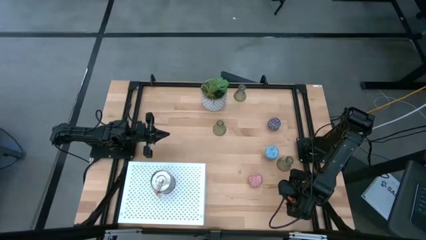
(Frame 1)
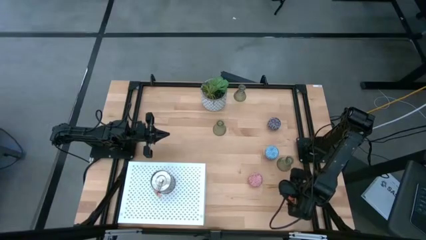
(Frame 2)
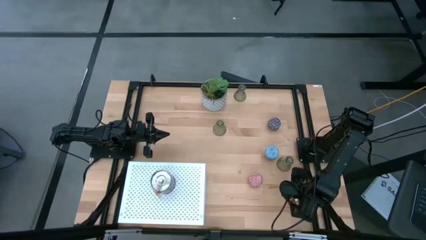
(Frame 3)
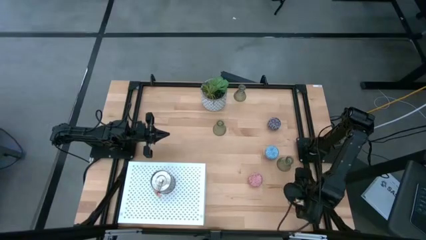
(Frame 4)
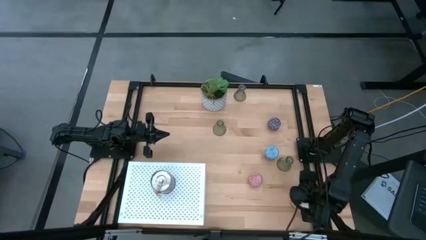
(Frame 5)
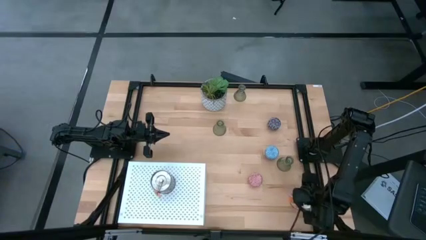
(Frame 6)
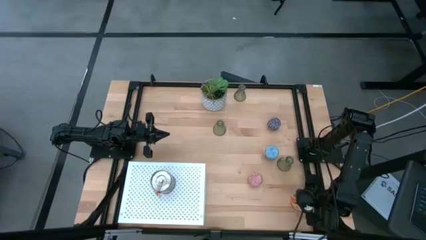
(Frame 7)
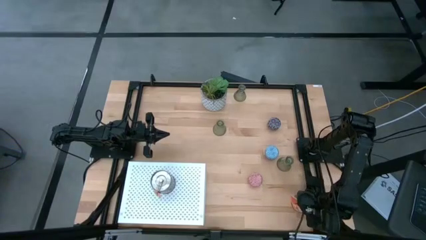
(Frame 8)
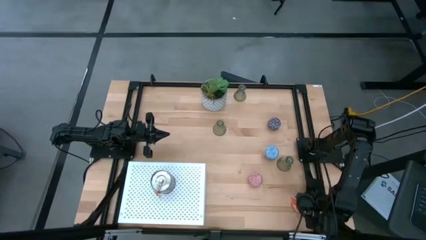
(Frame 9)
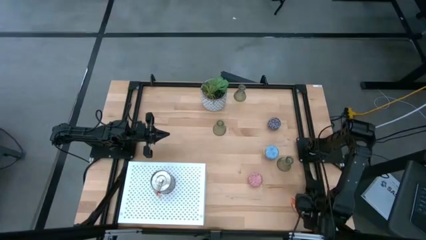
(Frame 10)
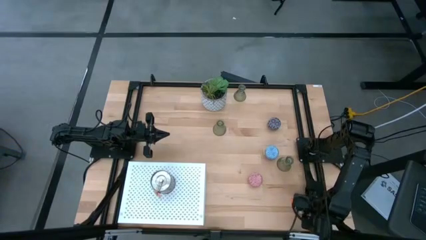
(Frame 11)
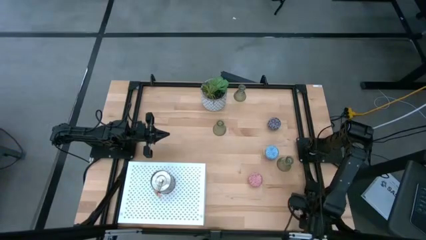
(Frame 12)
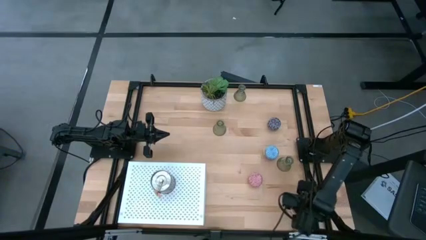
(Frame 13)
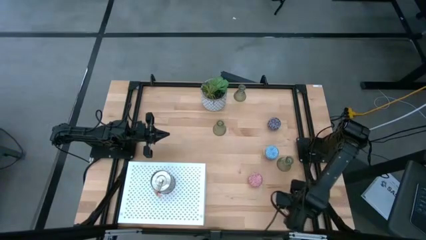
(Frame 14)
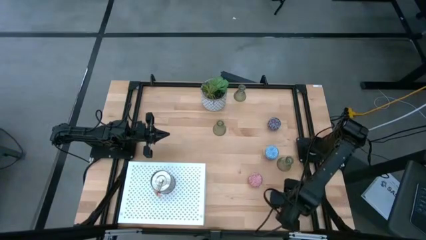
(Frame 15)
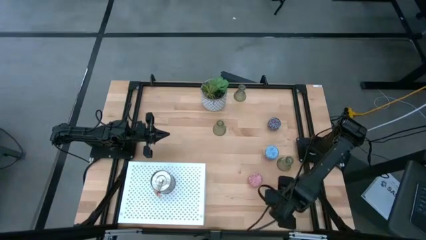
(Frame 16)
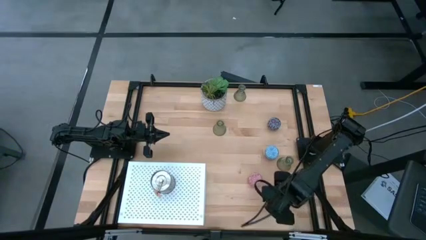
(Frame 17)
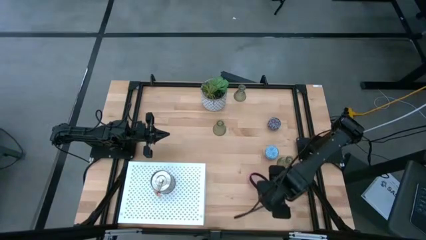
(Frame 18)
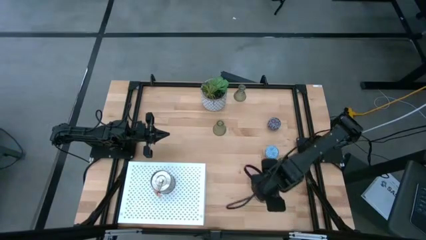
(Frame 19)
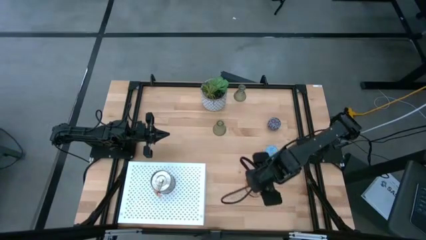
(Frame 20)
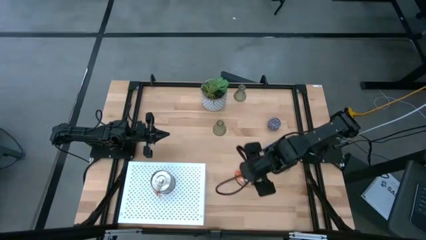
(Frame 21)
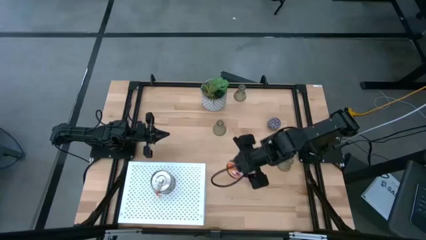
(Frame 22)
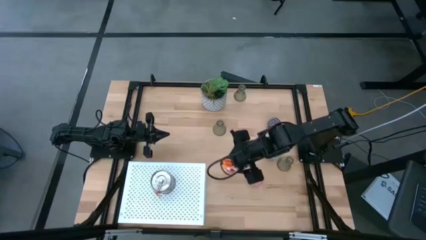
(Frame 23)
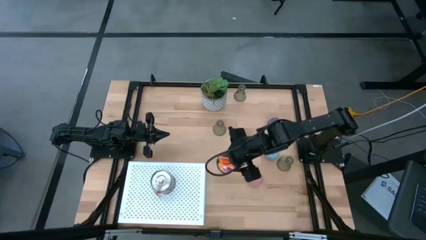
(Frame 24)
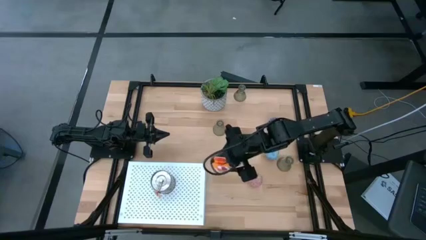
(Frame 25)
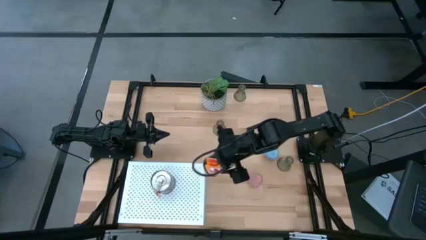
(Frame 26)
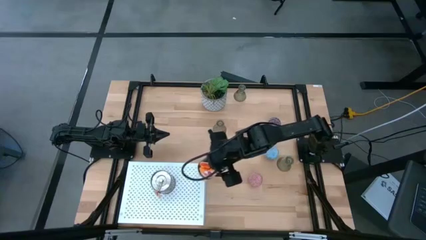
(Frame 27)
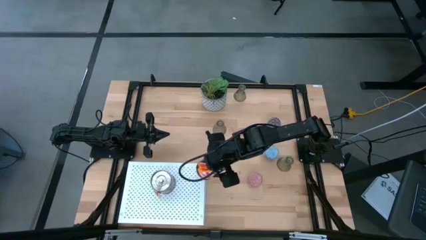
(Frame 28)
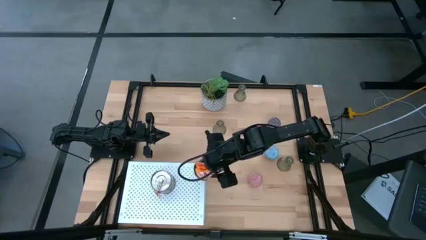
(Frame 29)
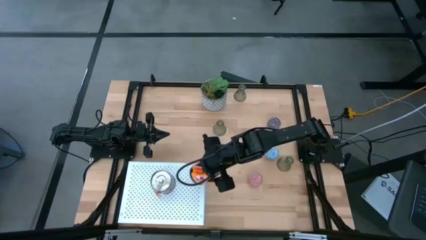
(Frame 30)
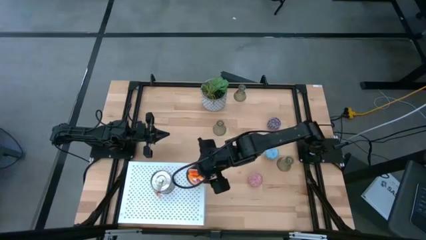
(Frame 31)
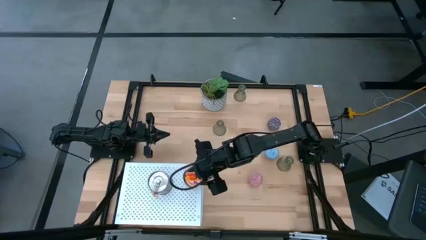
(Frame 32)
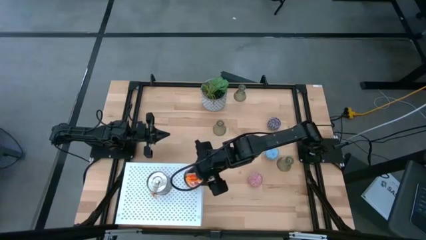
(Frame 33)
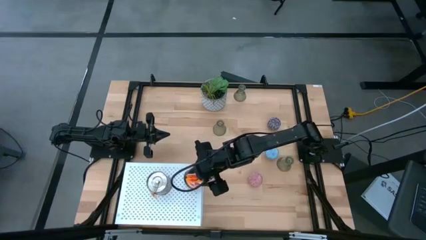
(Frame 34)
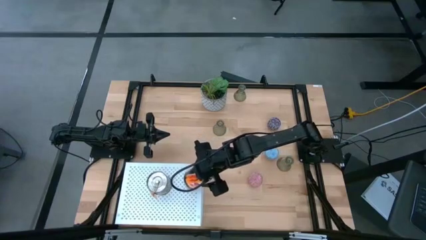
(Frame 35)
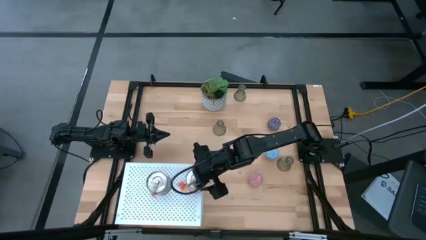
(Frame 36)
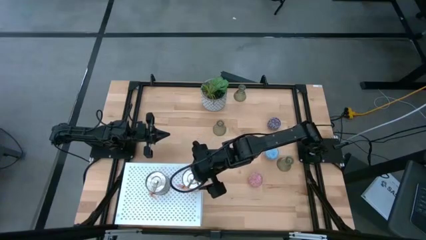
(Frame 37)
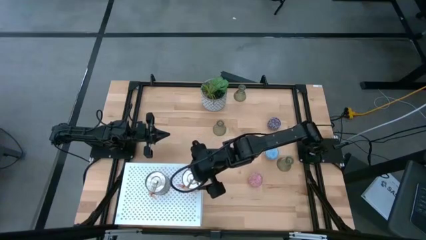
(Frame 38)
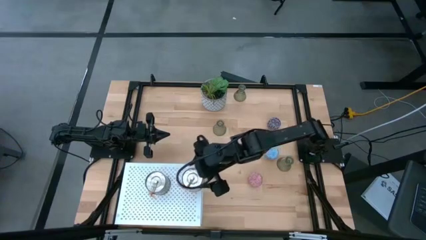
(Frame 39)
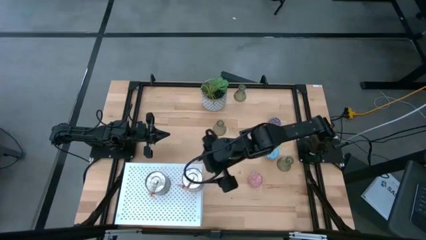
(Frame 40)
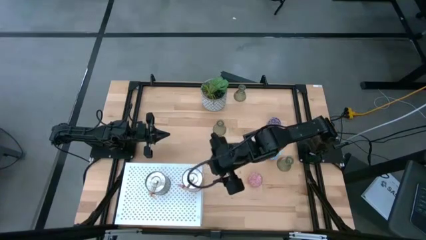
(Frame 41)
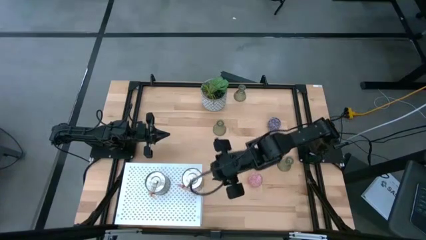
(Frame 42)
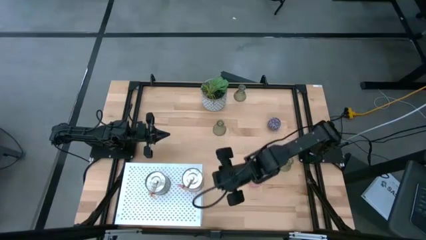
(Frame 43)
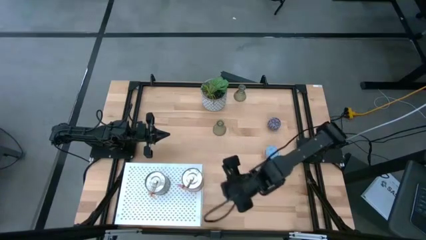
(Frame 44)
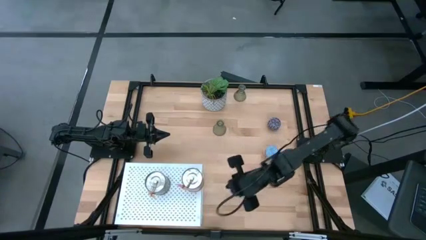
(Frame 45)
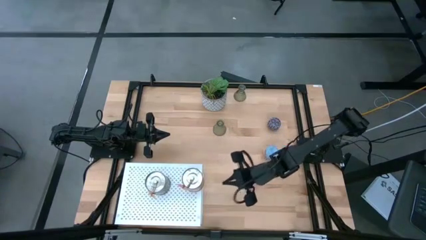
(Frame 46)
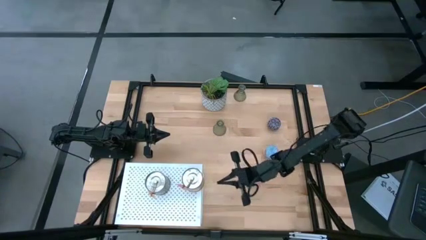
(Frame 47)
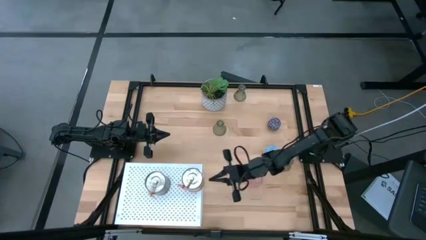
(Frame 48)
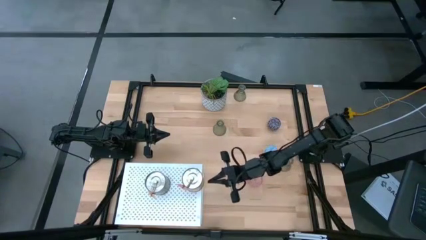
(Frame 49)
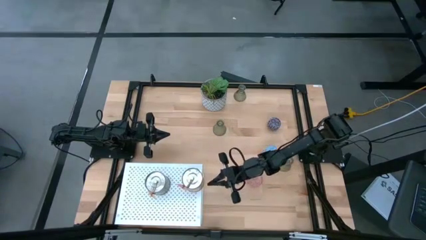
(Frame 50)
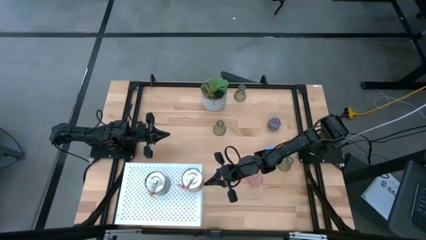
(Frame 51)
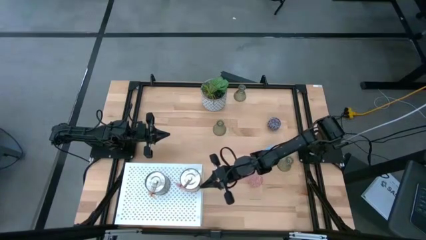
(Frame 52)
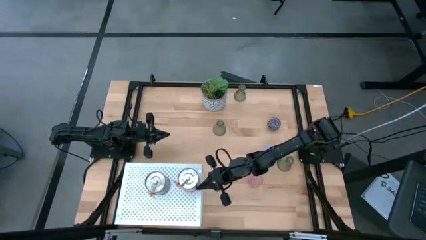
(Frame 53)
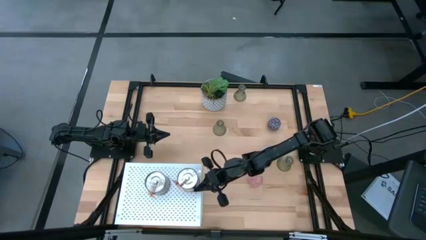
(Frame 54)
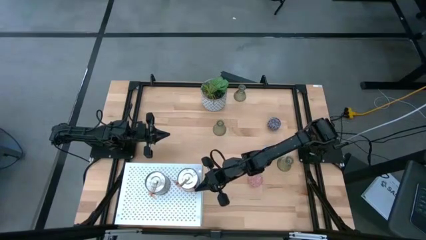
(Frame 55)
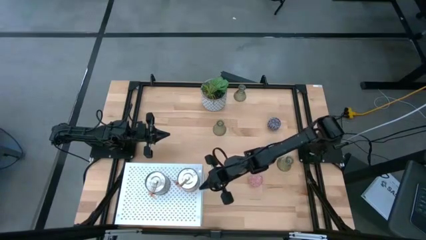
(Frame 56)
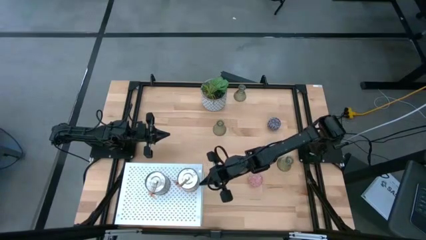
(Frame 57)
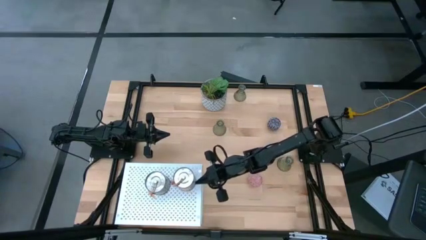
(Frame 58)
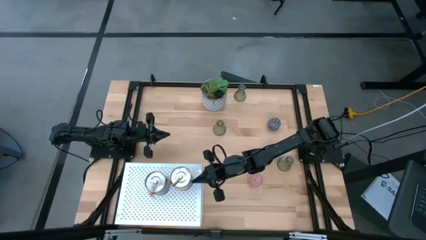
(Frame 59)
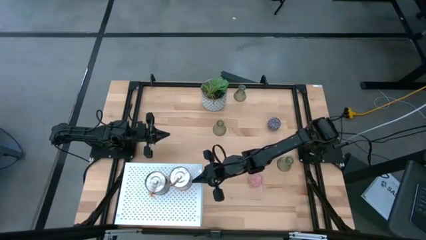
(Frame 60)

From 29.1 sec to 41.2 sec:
Task: Pick & Place candle stick holders
Put the silver scented candle on the shelf

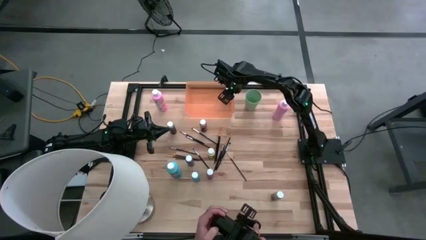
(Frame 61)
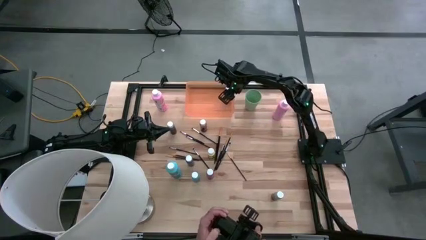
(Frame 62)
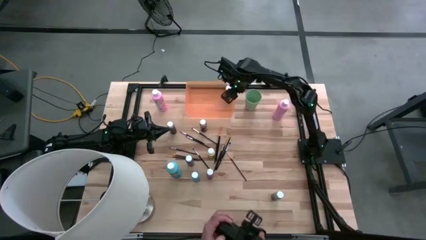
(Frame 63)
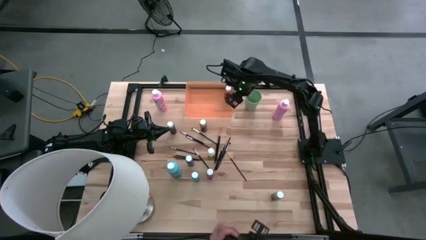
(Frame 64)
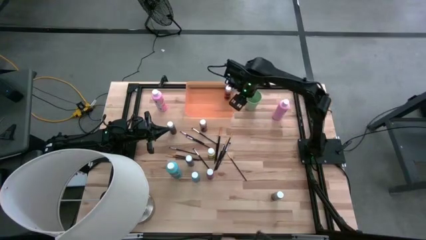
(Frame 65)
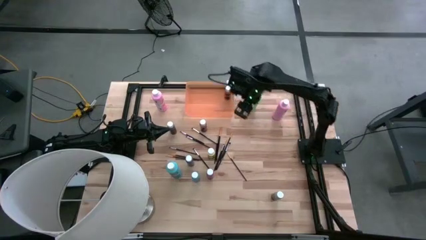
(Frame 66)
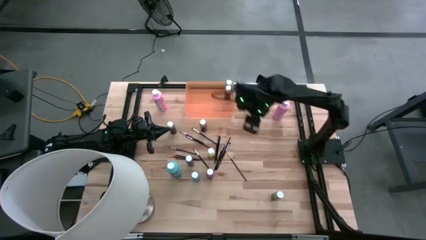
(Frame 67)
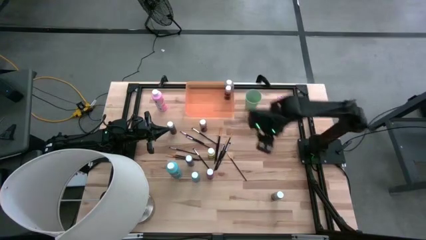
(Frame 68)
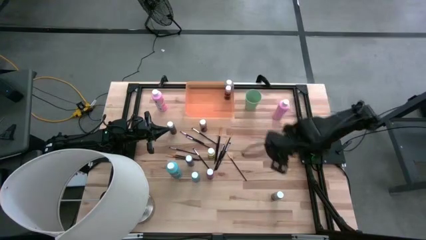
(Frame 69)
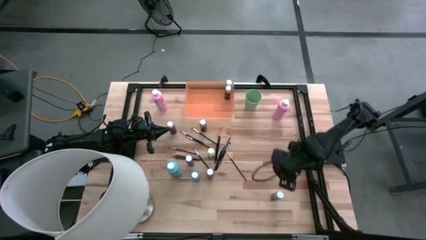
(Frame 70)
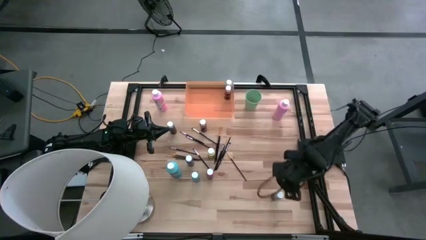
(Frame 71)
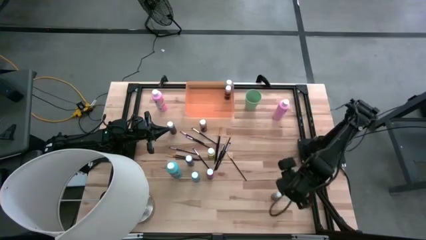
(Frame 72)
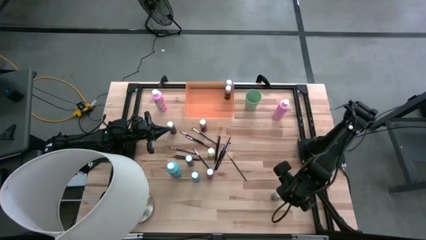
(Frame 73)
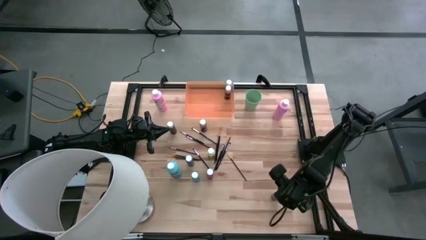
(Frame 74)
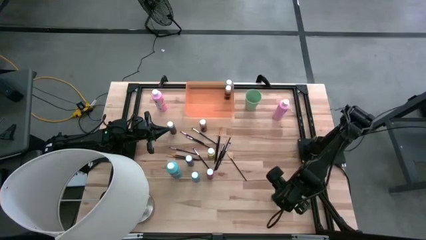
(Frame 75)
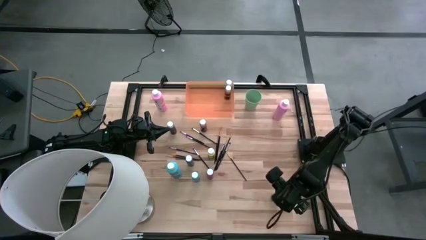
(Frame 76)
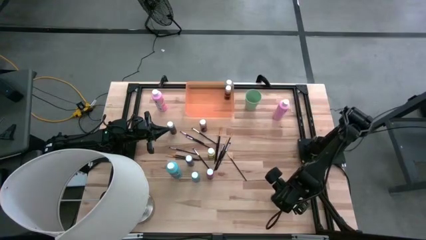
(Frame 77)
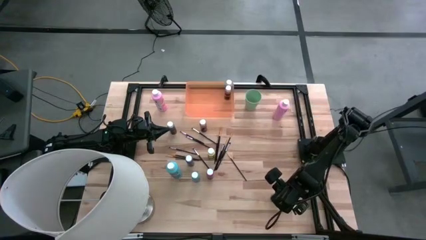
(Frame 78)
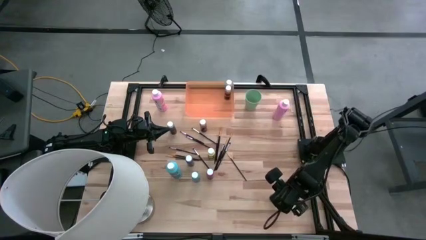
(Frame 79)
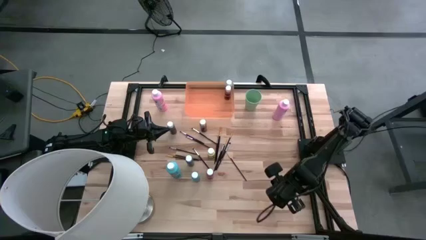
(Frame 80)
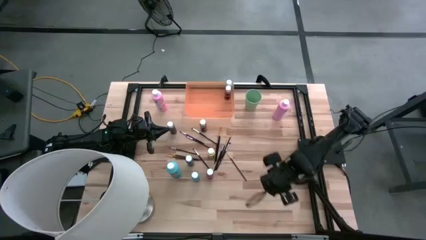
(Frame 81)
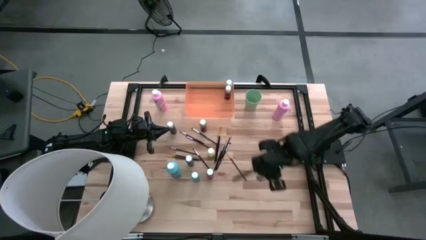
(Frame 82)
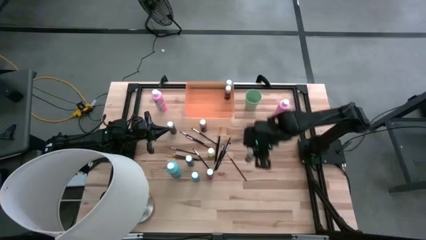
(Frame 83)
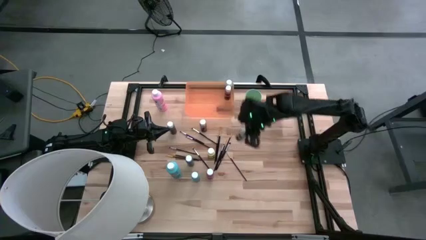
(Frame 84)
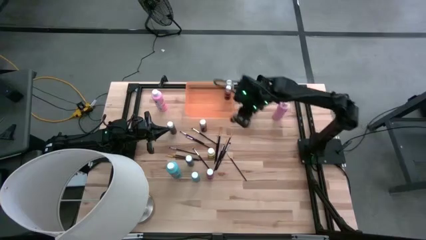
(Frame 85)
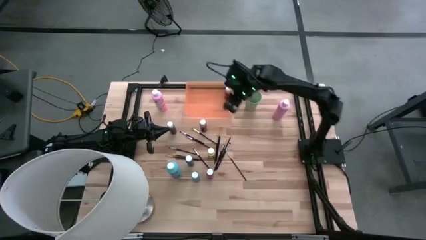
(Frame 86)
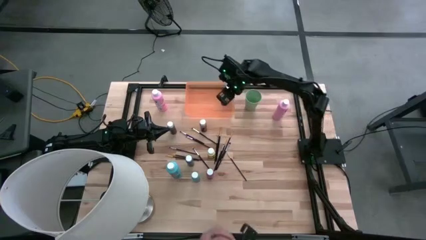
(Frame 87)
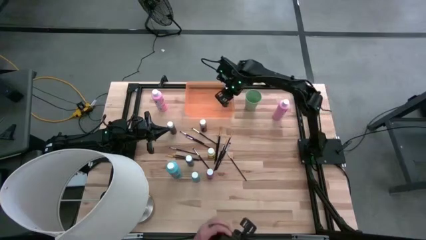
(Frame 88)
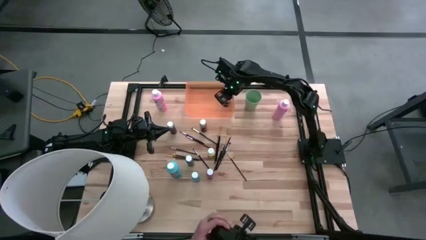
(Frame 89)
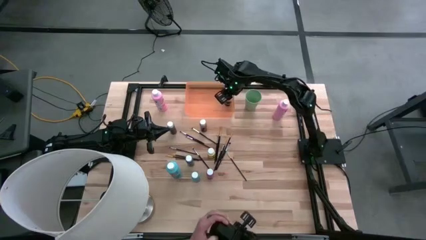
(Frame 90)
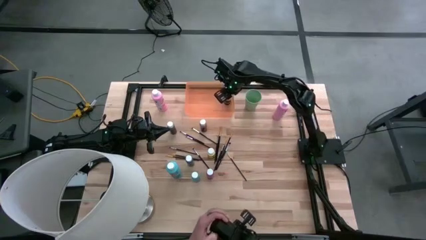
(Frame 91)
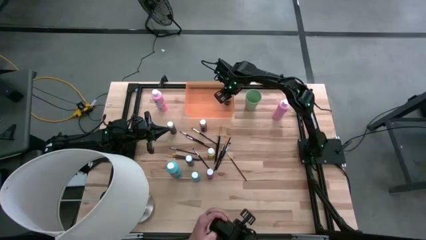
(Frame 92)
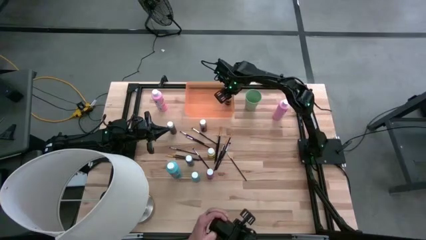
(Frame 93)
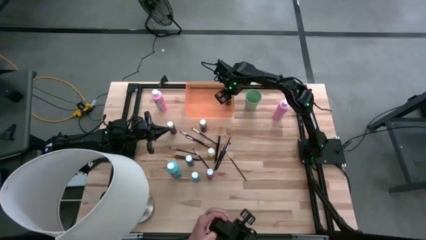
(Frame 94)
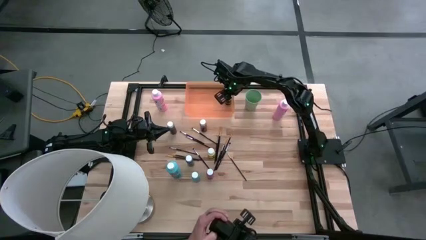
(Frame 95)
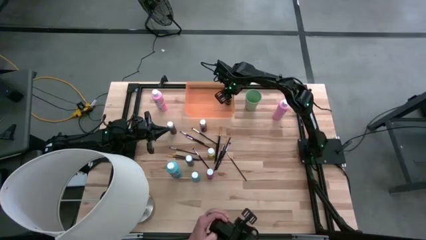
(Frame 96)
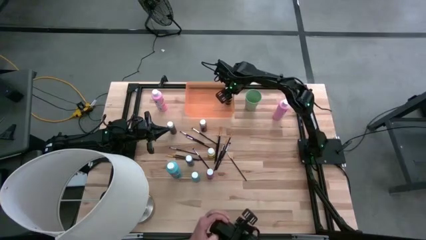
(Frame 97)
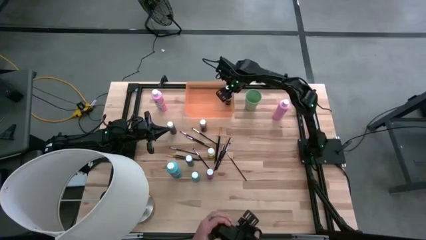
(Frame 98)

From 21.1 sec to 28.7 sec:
Task: Pick & Place Paint Supplies
Put the small gray paint bottle into the orange bin
